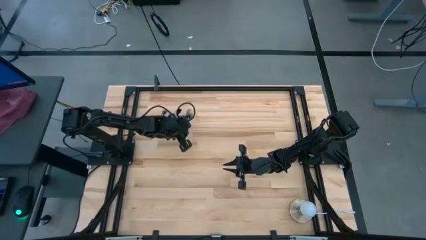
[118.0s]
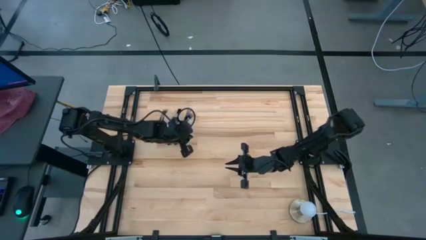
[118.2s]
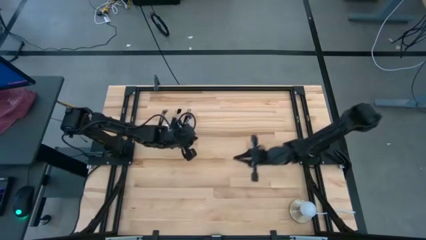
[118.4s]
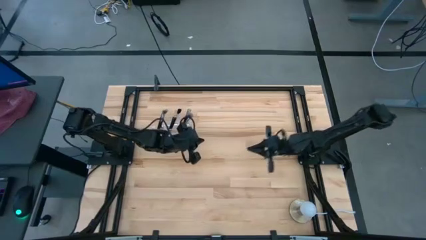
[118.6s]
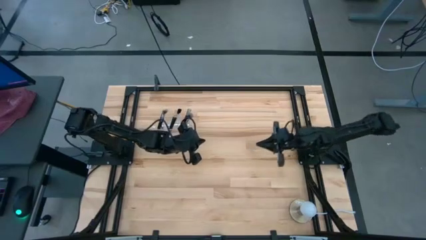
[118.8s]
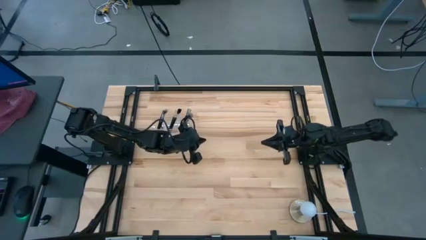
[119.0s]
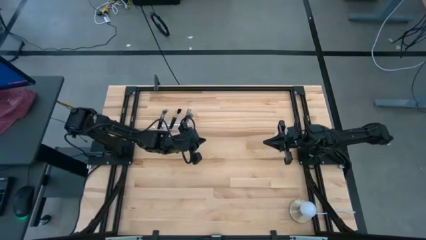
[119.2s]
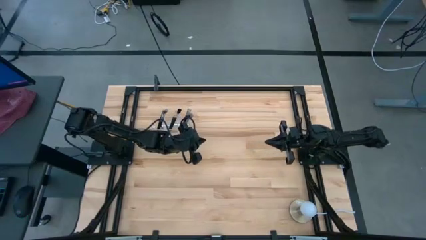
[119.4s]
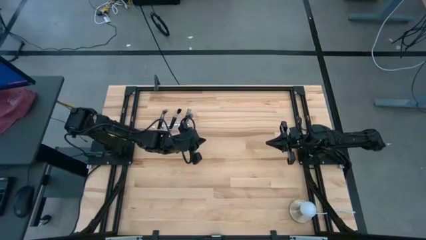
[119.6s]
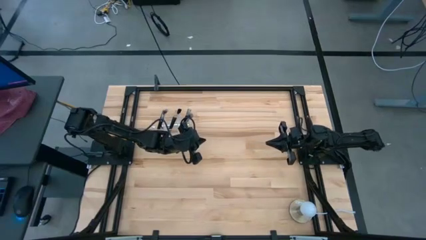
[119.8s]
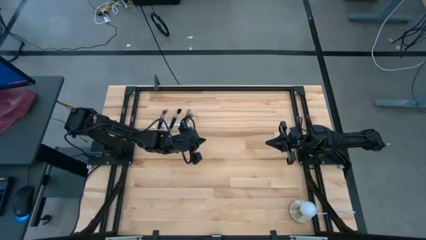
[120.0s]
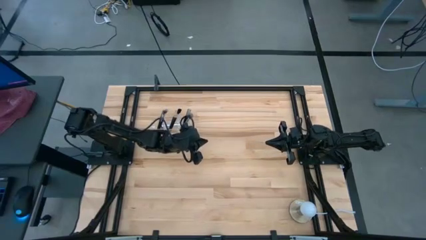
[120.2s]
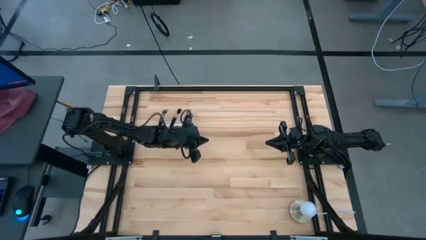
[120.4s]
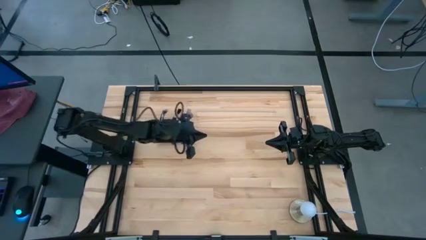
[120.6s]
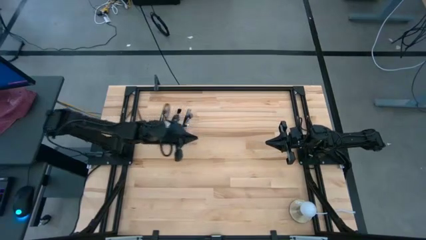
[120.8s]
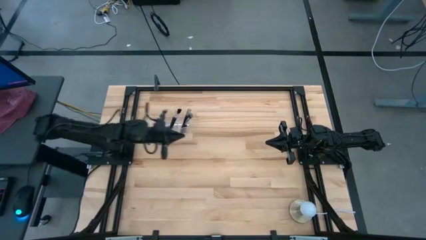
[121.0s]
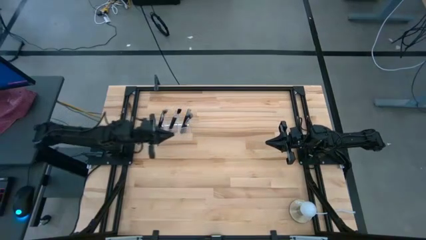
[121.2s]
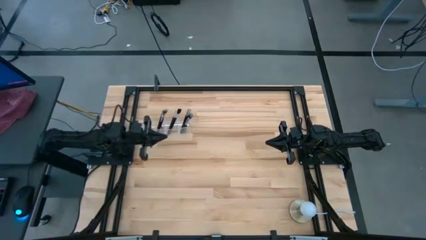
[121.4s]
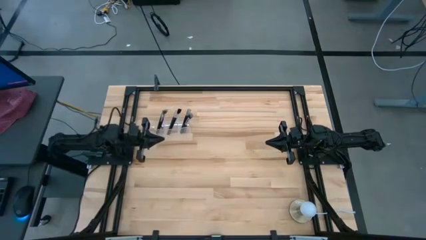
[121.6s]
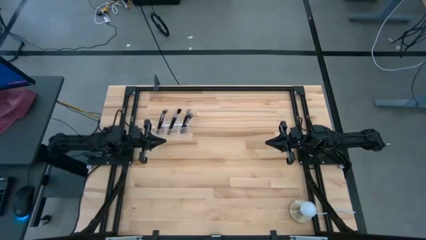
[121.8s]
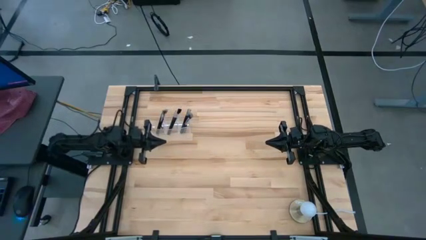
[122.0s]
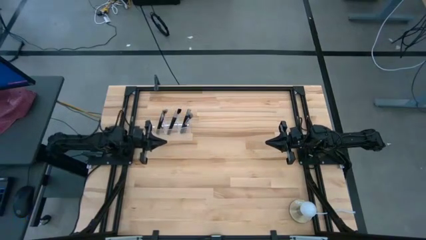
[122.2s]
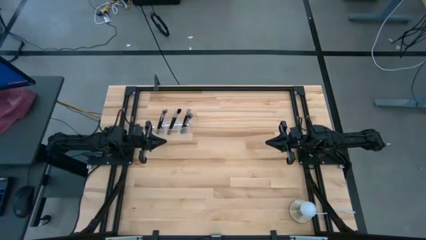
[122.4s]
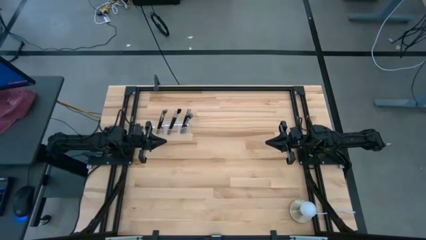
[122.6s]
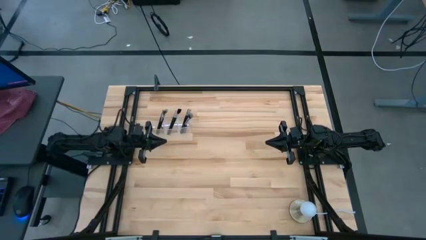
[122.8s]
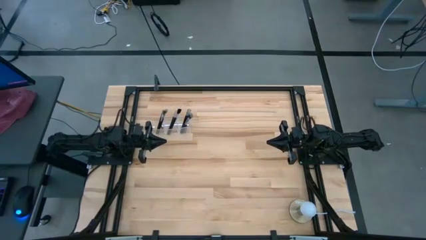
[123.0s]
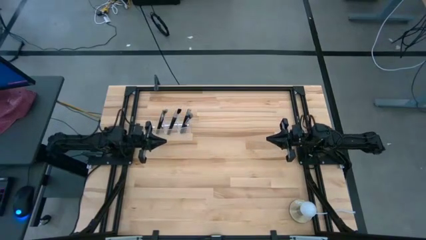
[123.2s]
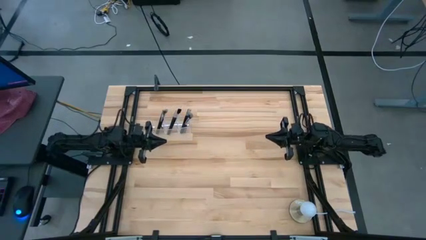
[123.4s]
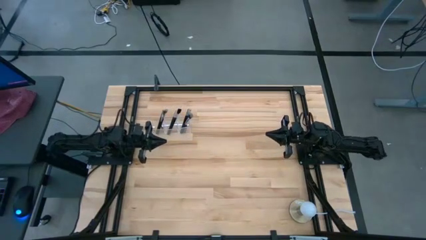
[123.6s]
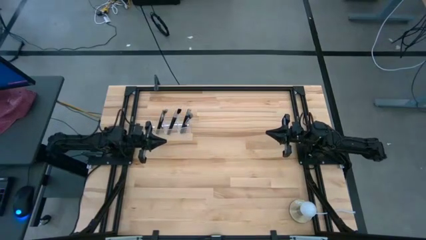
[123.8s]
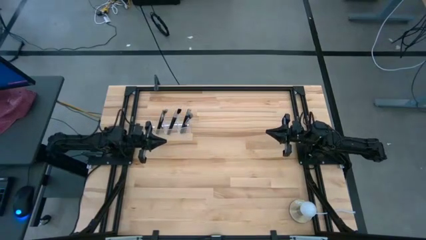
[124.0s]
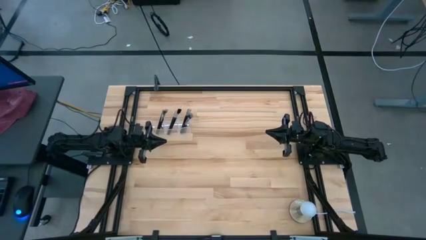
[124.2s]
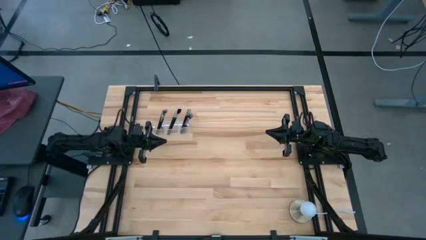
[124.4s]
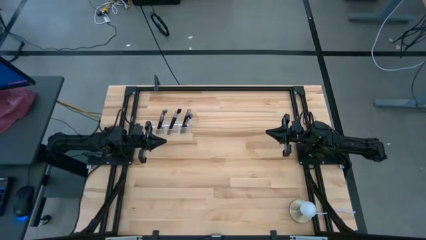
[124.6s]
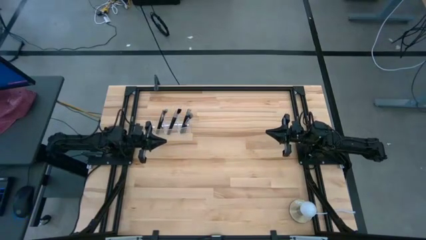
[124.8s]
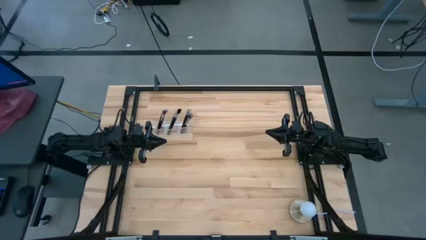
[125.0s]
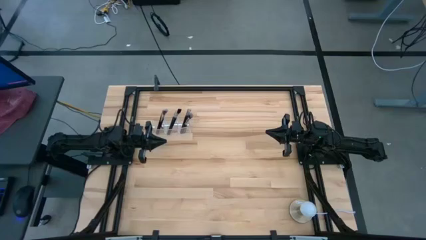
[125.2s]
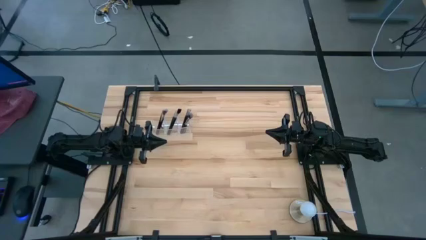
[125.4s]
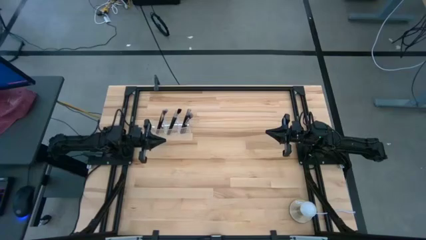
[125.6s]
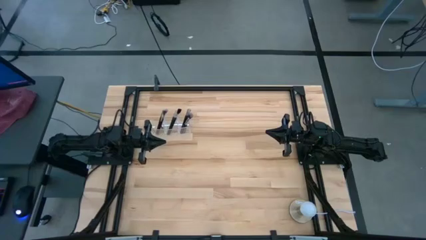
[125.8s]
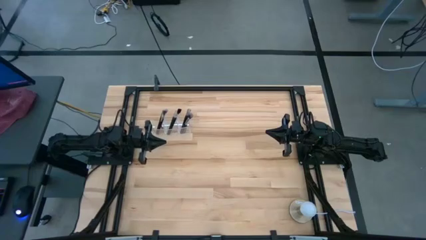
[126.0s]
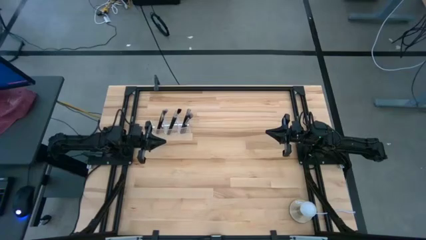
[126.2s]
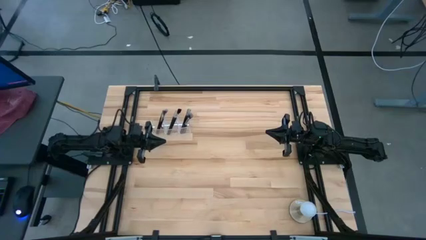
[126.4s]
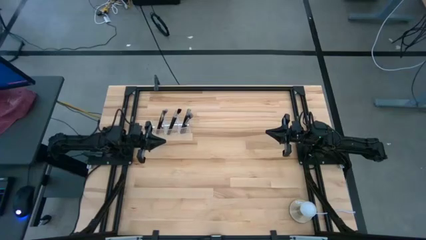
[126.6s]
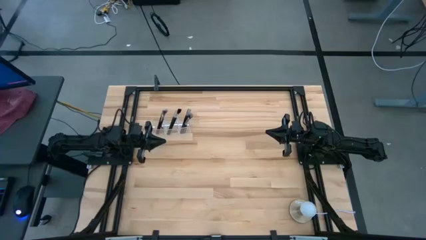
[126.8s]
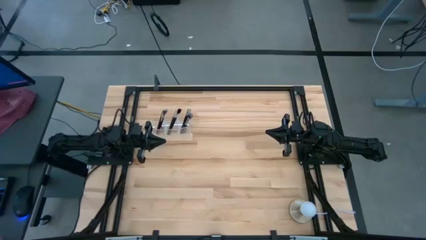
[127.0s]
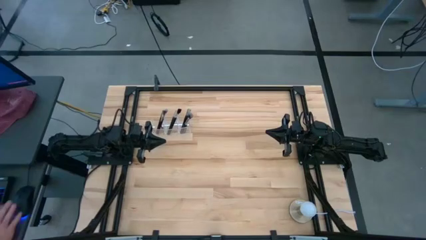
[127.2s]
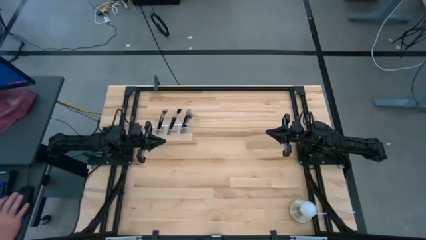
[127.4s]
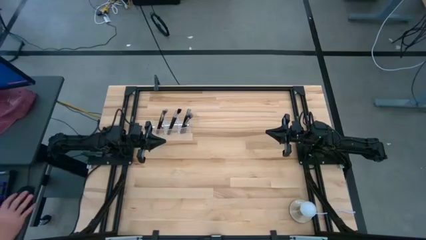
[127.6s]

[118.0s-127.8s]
Task: Put items in baskets/containers
Return to Home Position
